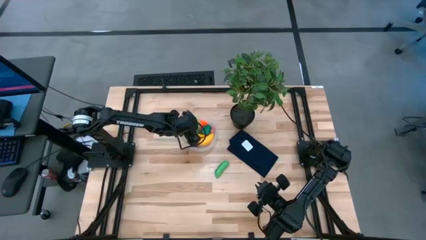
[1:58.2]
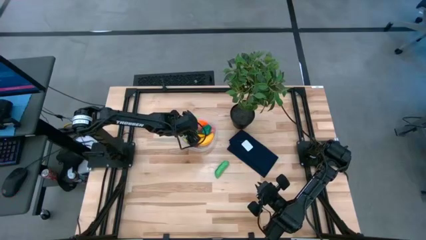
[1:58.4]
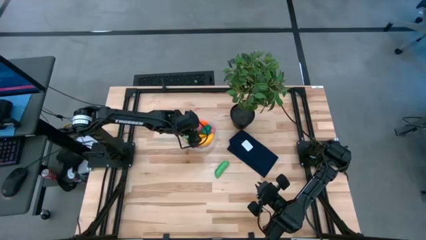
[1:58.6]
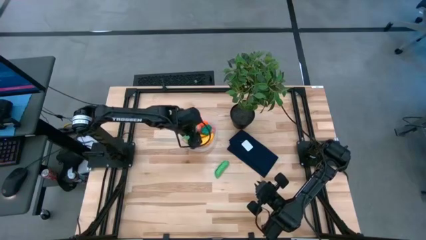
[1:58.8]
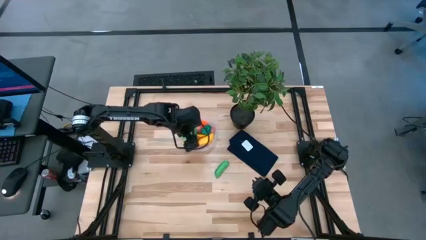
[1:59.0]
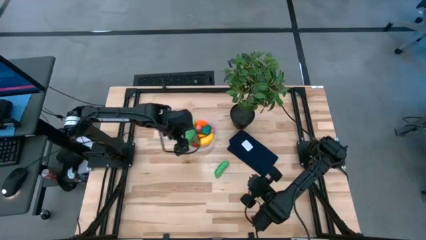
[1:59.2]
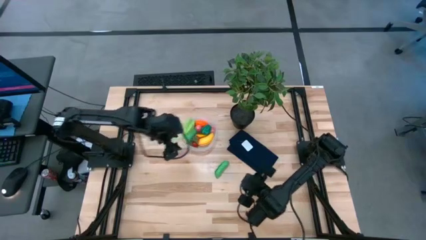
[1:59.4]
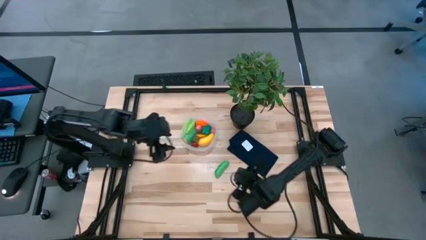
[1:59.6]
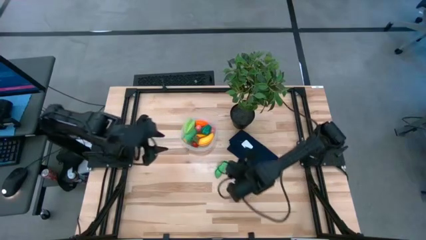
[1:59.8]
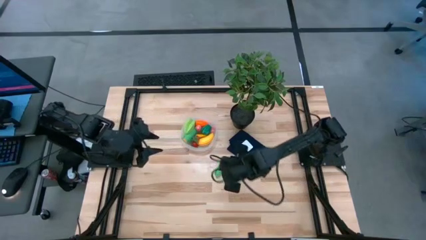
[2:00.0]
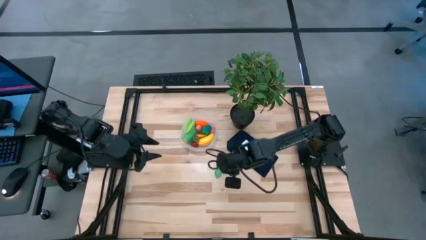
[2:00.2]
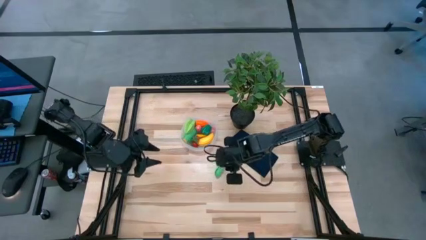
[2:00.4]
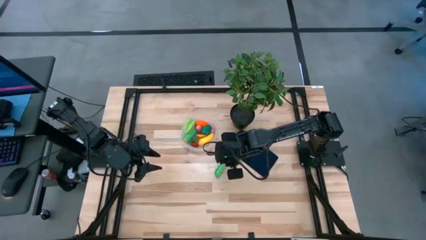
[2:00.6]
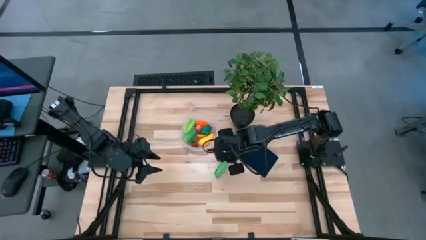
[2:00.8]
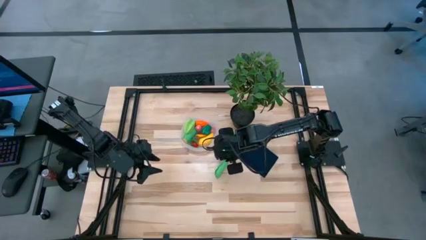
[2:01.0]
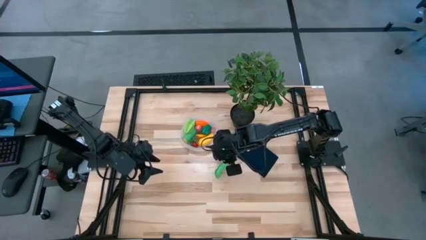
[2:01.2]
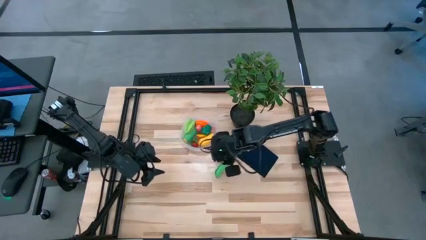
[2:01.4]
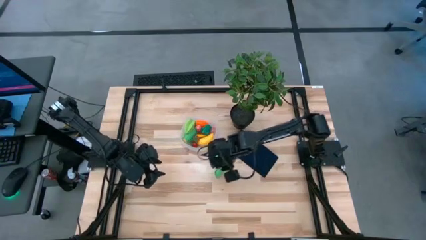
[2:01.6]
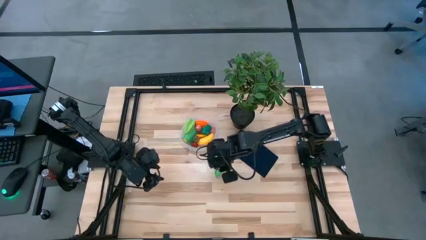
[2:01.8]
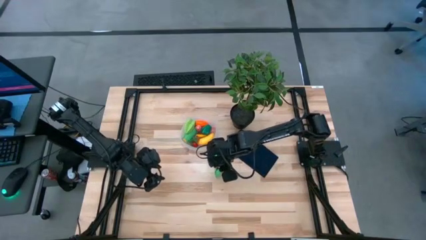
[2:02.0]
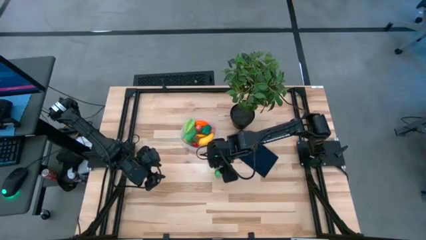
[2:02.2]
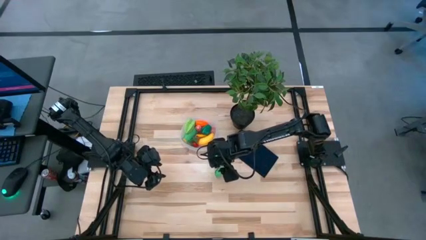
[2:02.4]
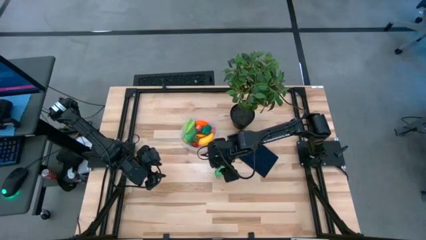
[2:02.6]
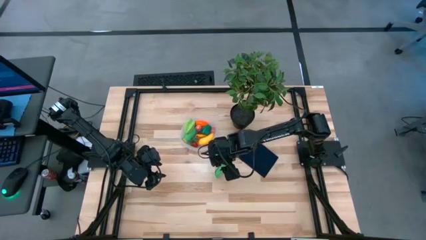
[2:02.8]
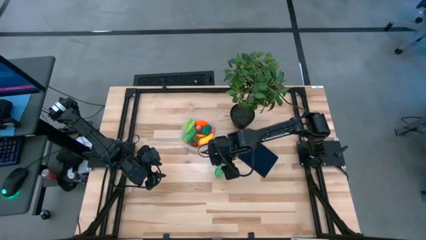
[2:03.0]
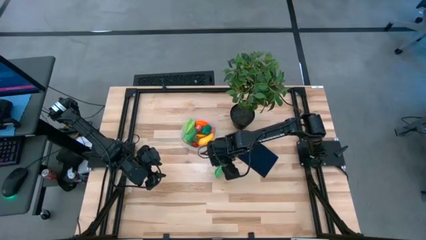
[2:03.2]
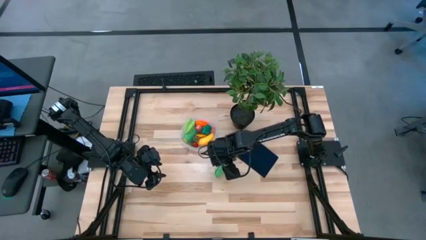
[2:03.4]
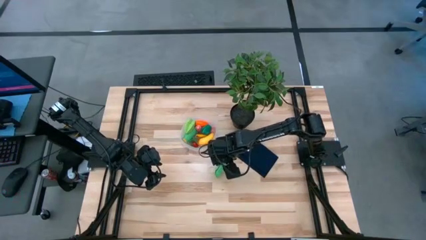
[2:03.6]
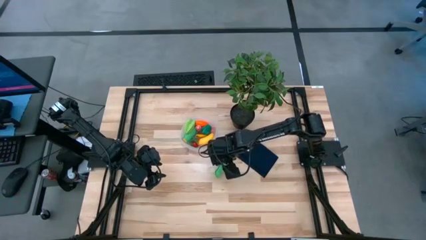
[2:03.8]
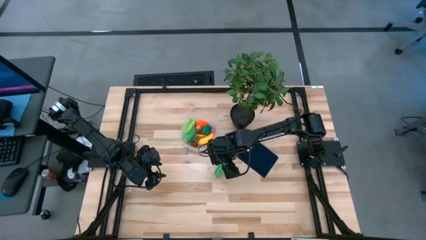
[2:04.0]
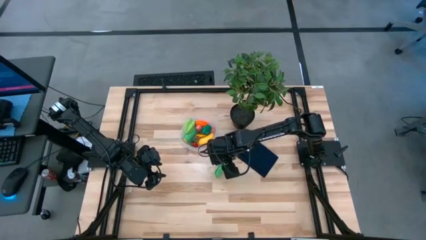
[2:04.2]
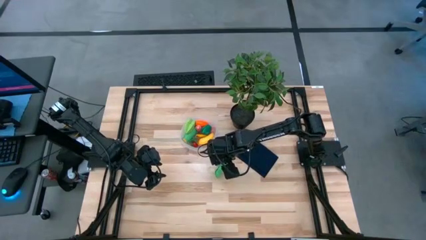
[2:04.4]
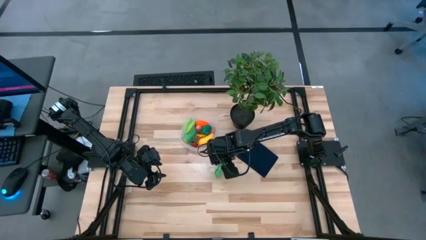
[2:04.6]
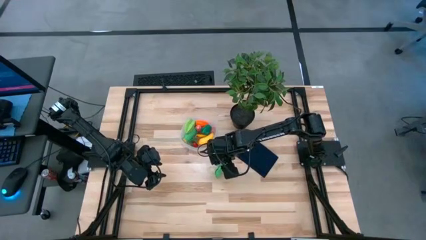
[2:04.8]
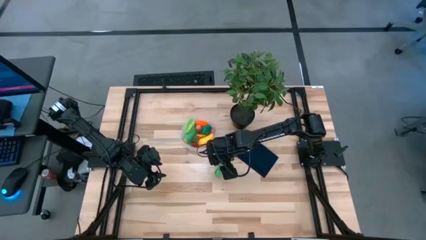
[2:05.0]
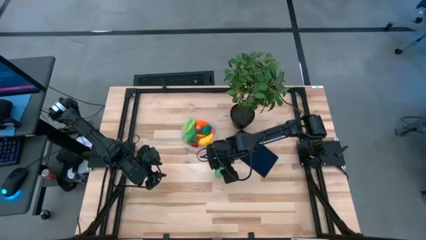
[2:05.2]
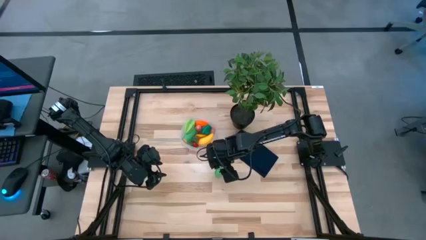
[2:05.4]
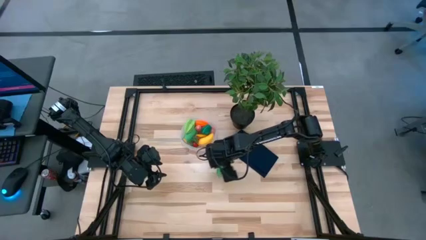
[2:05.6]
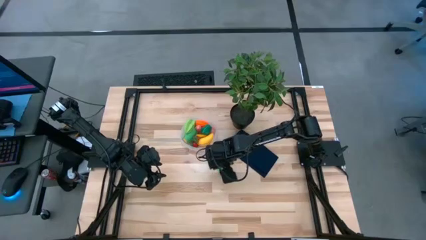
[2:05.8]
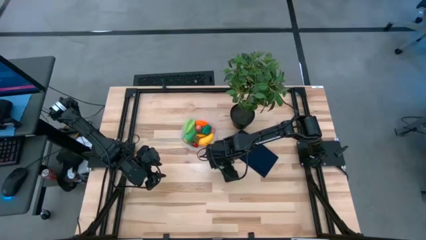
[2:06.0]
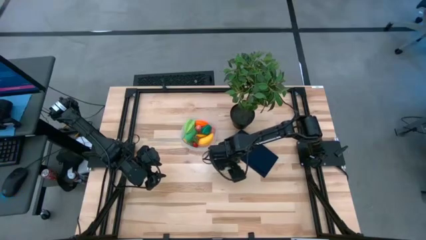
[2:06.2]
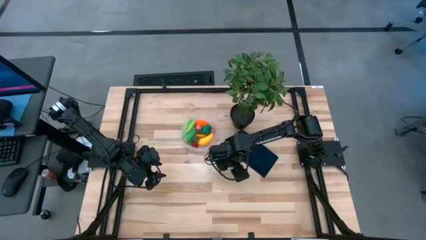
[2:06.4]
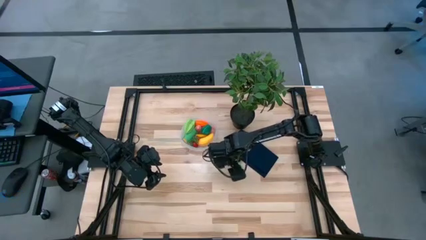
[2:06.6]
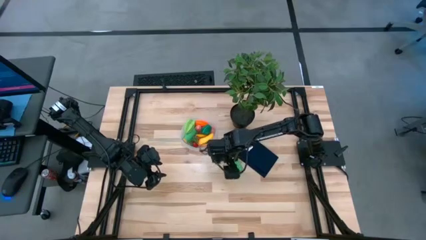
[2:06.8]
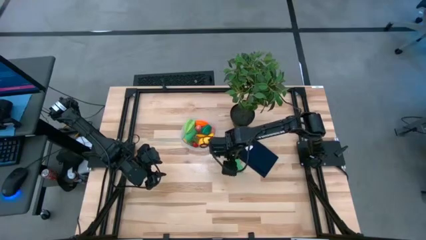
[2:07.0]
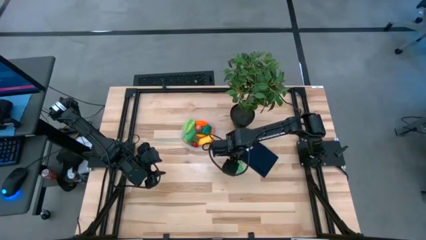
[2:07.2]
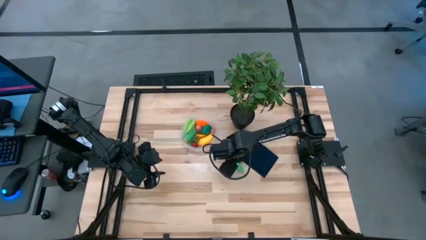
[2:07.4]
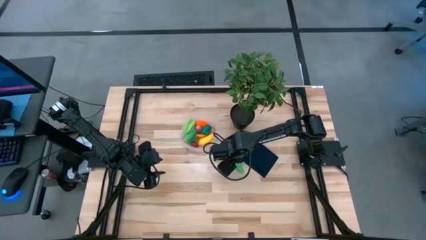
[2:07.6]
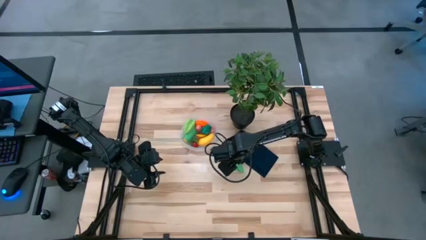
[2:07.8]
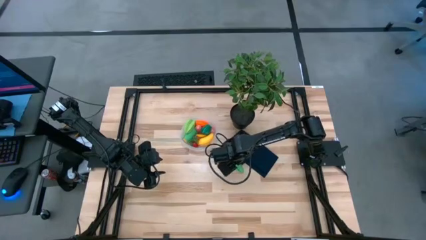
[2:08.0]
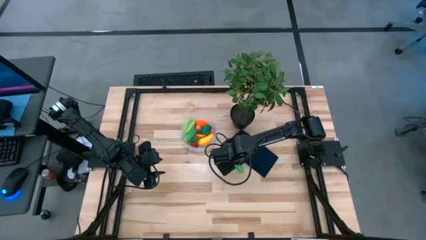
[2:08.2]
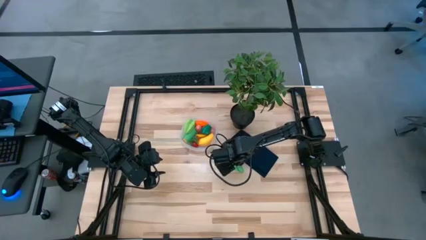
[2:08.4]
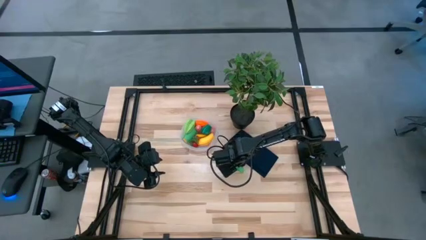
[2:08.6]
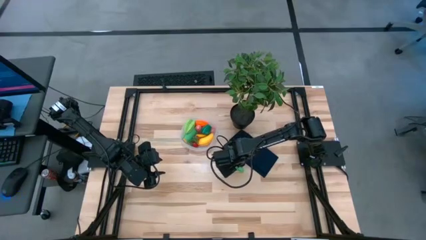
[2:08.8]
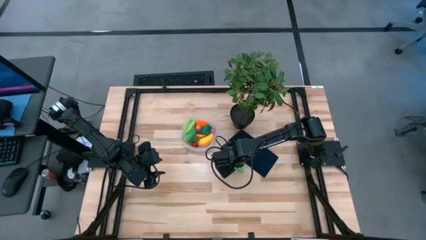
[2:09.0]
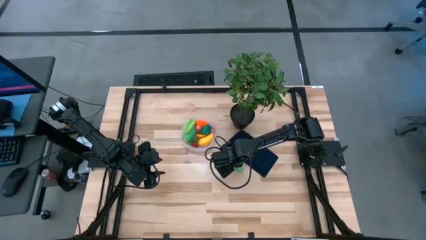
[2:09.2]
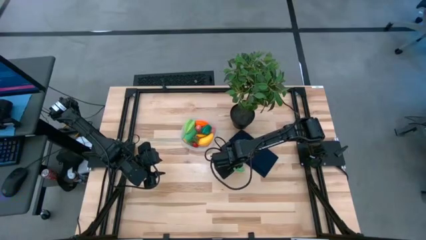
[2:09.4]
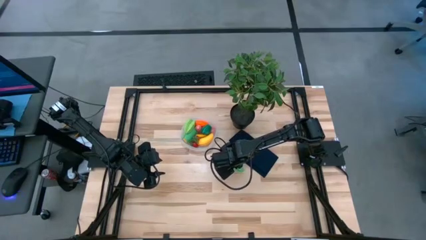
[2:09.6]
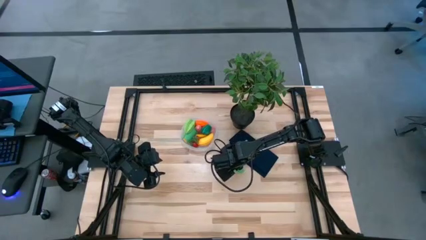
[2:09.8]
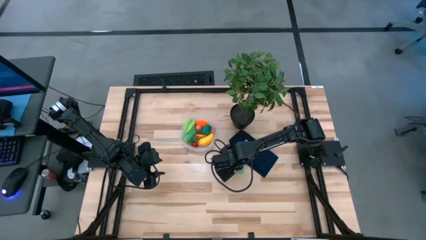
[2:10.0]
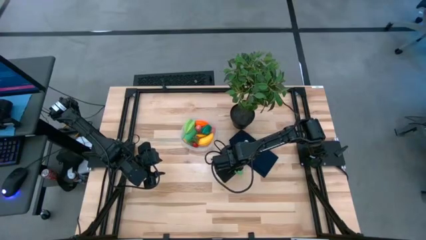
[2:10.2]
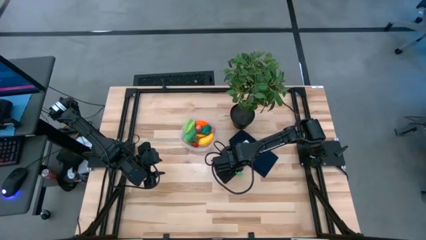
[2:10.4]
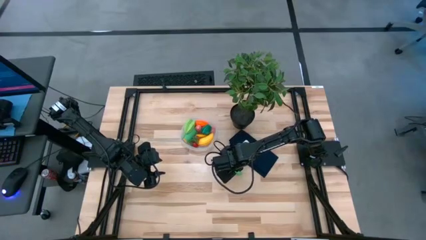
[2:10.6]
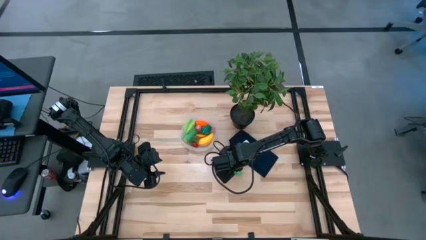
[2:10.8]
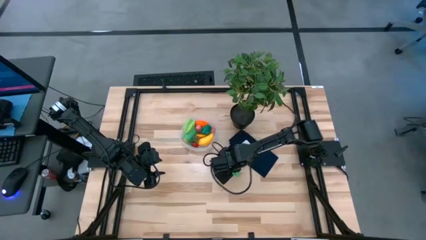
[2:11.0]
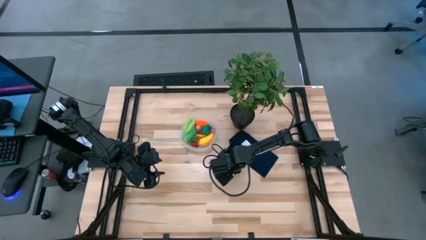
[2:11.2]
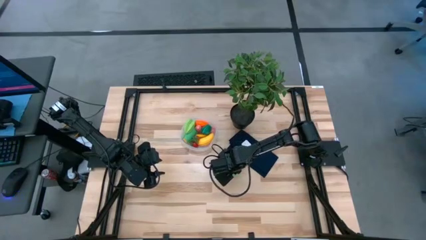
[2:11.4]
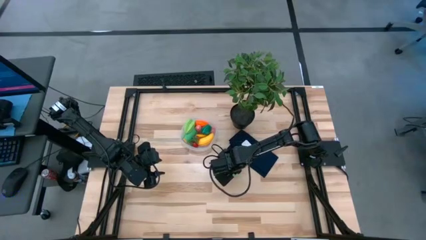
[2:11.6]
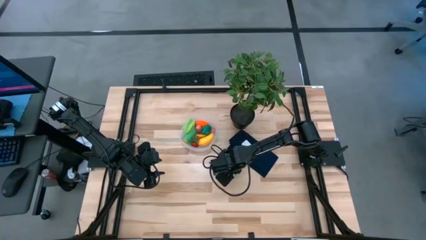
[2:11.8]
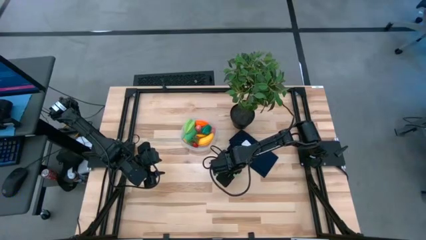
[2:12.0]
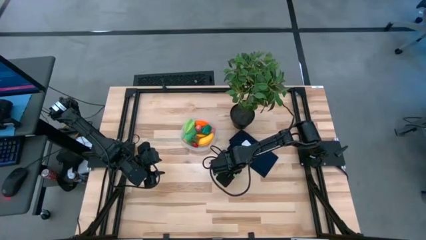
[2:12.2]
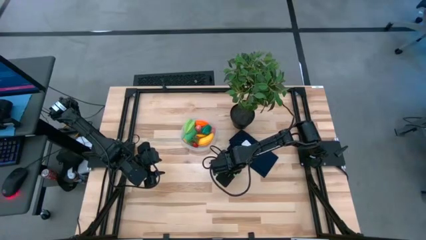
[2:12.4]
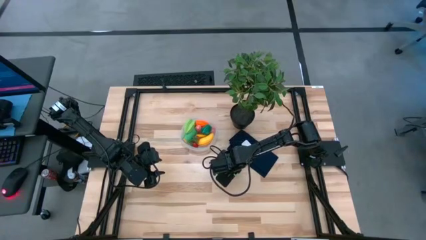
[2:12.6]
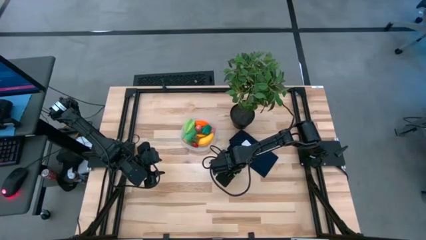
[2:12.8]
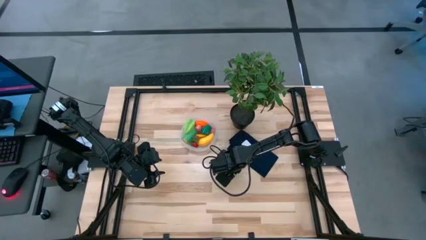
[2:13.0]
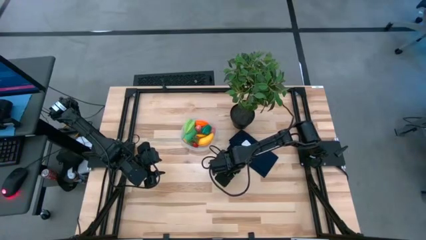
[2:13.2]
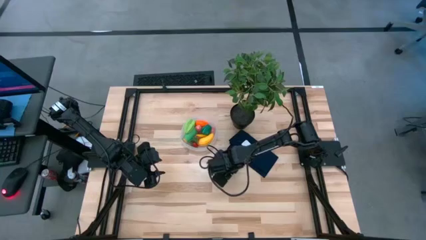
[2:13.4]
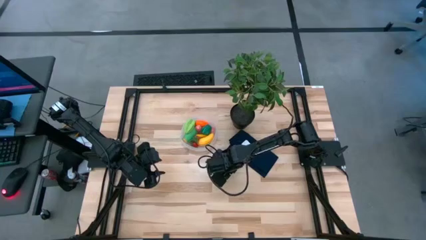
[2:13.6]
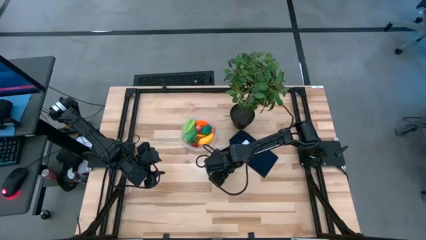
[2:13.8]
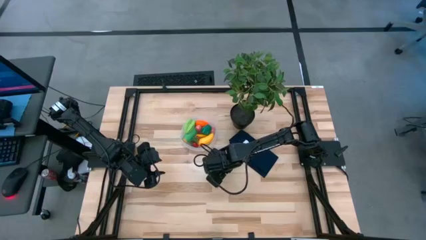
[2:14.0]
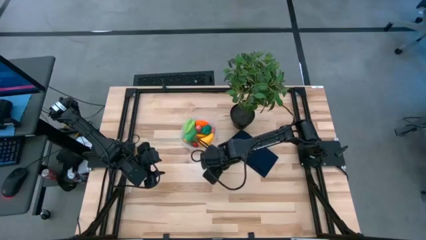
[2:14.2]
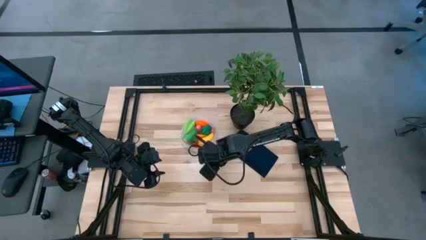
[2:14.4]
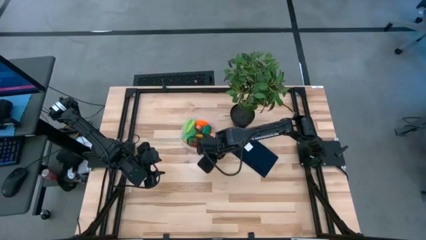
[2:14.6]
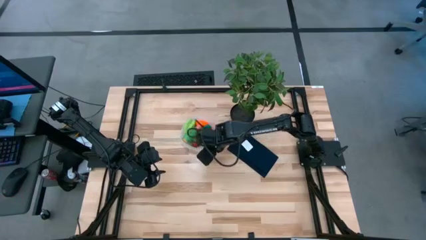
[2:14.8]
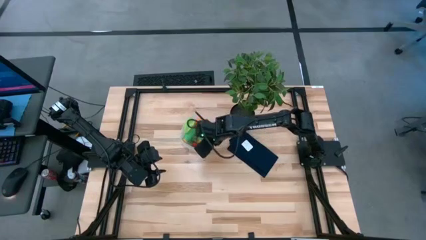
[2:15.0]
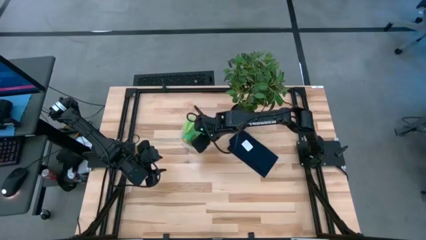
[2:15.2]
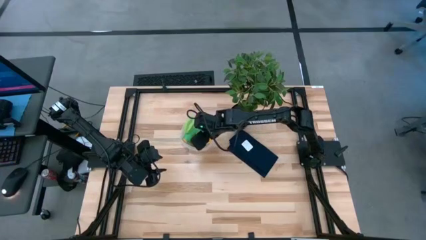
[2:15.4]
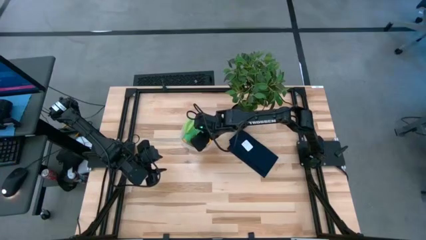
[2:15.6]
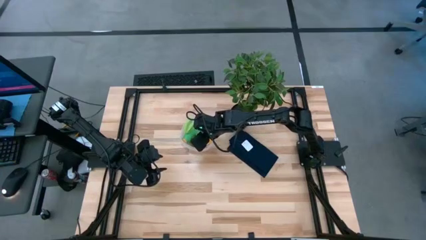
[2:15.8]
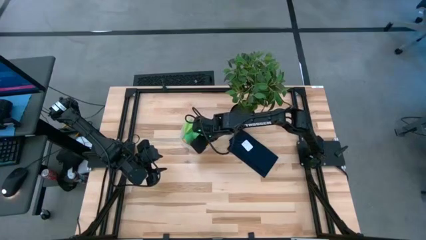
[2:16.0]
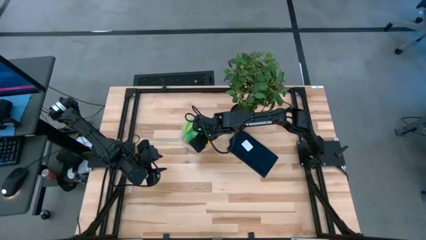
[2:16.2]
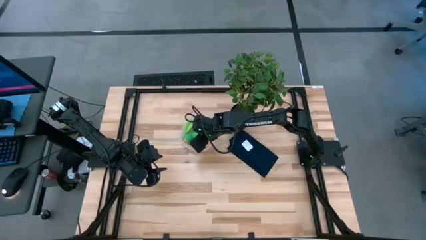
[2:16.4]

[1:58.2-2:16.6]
Task: Pick and placing Produce into tupperware
Put the green peas into the transparent bin
